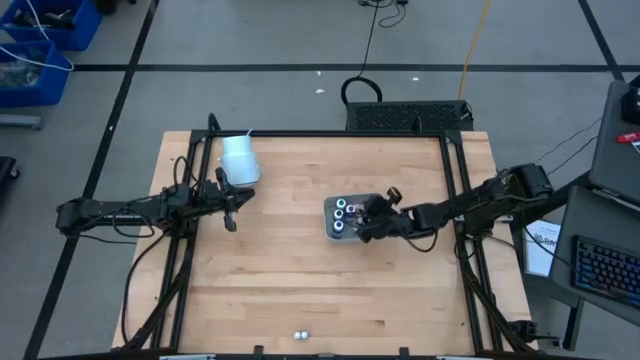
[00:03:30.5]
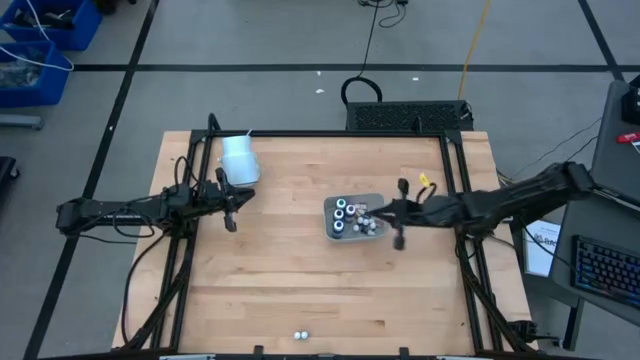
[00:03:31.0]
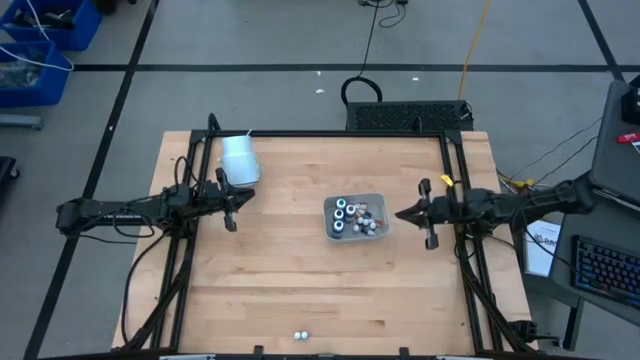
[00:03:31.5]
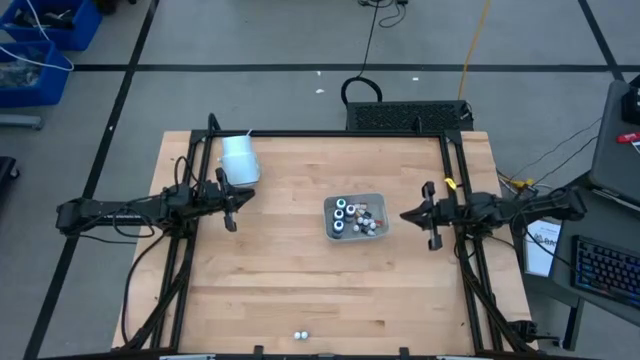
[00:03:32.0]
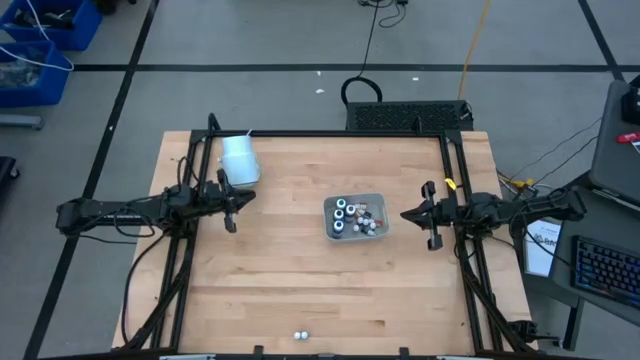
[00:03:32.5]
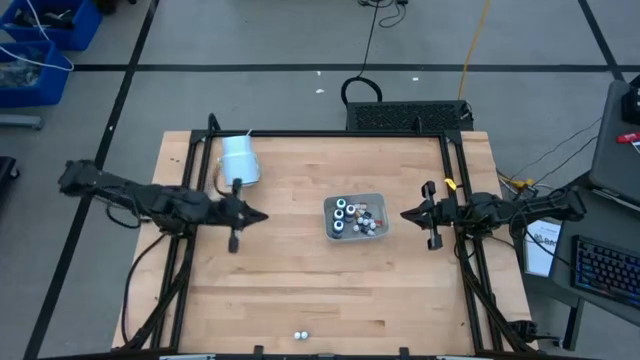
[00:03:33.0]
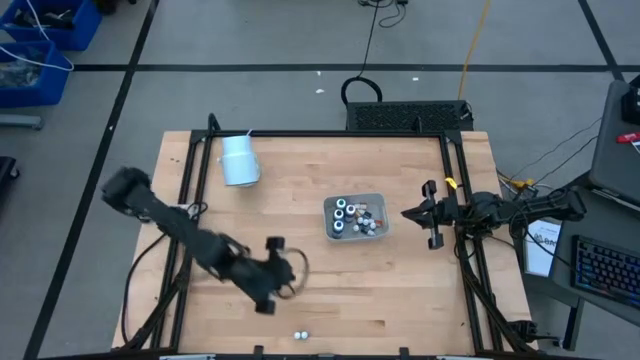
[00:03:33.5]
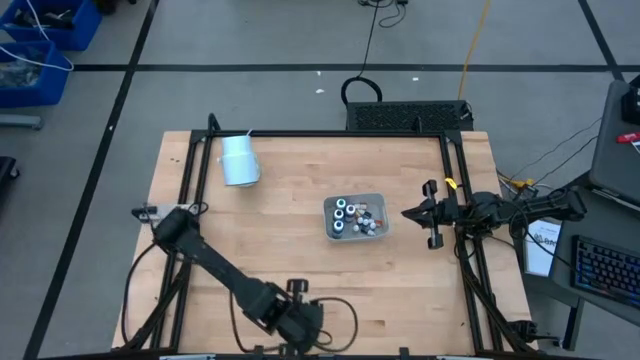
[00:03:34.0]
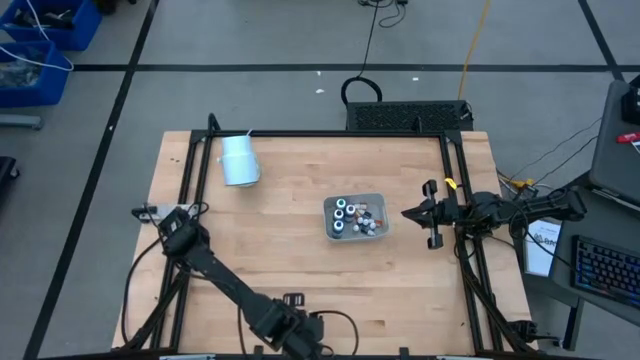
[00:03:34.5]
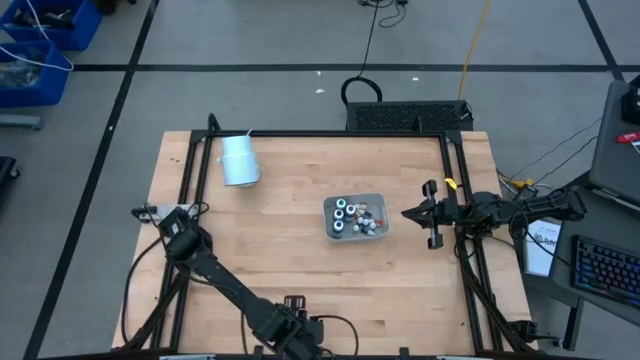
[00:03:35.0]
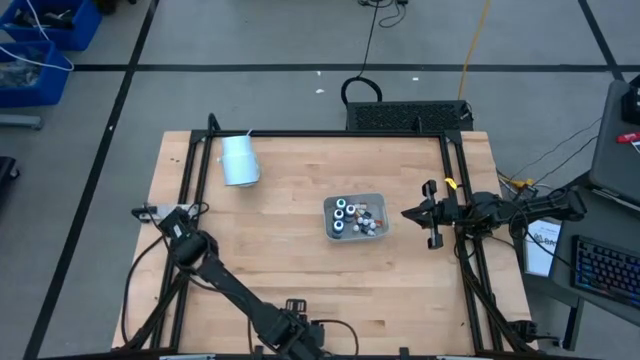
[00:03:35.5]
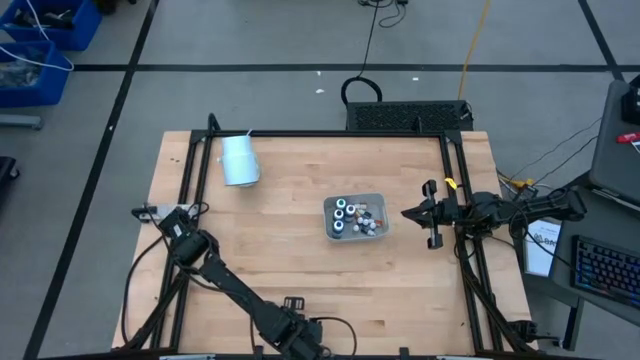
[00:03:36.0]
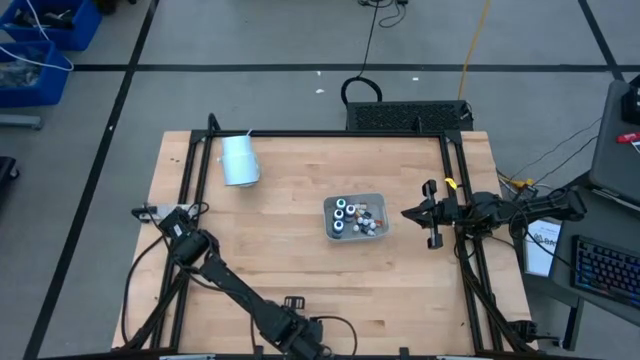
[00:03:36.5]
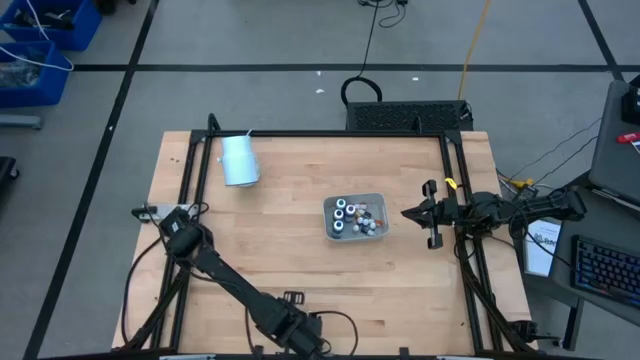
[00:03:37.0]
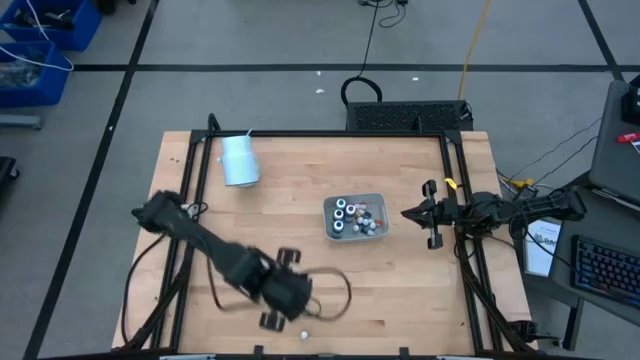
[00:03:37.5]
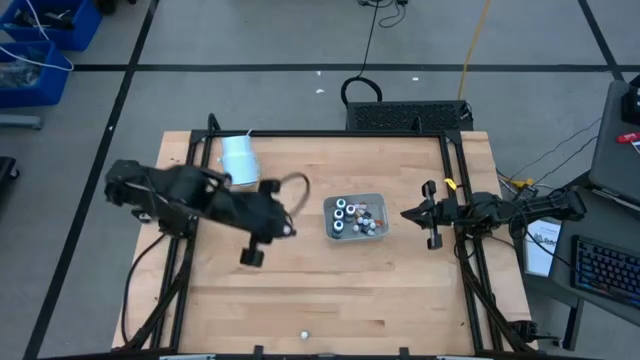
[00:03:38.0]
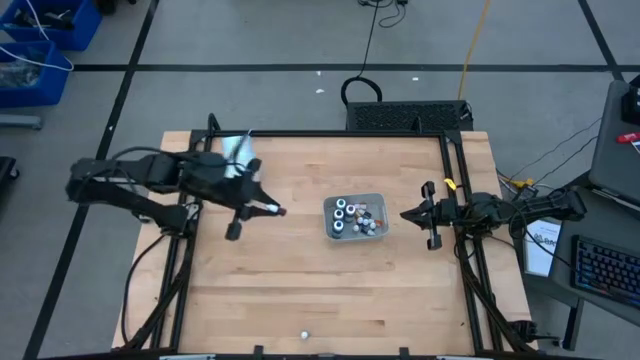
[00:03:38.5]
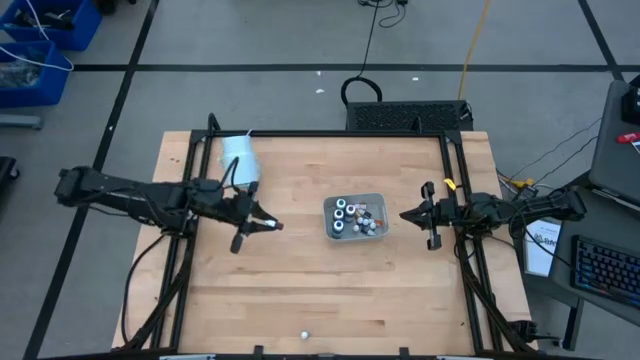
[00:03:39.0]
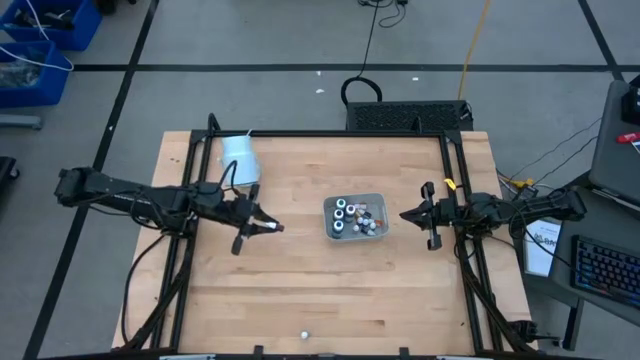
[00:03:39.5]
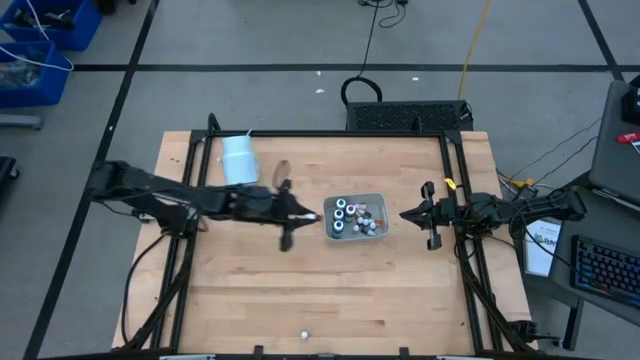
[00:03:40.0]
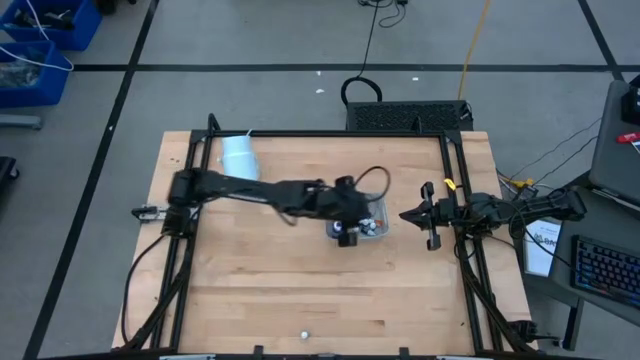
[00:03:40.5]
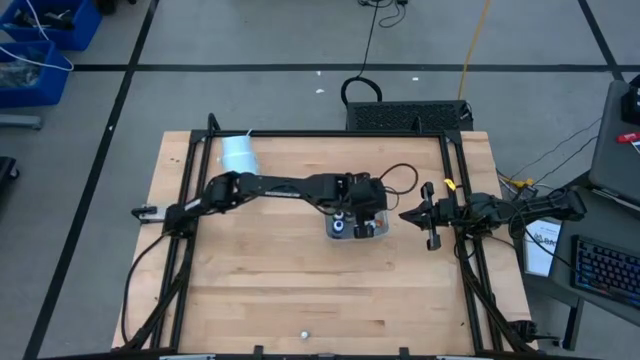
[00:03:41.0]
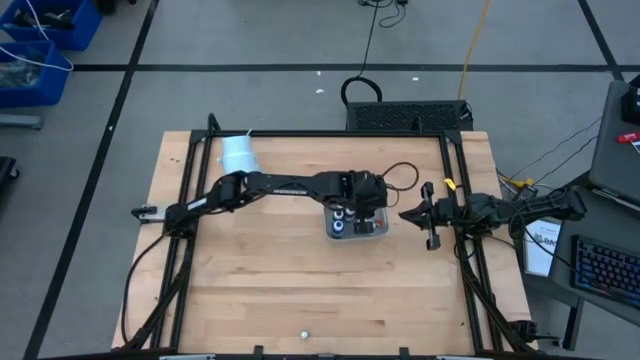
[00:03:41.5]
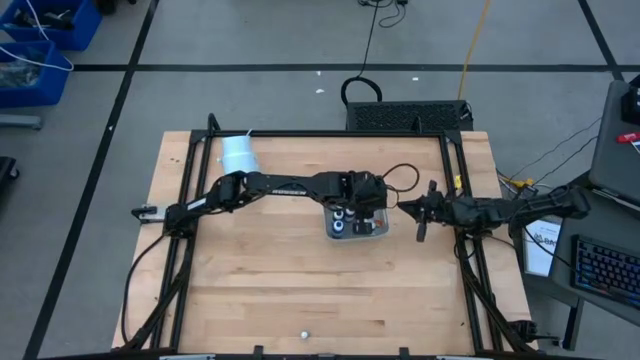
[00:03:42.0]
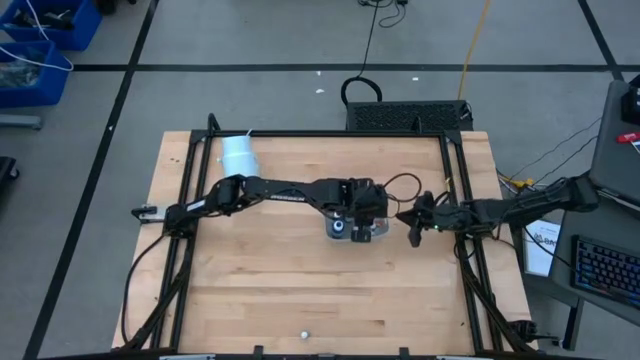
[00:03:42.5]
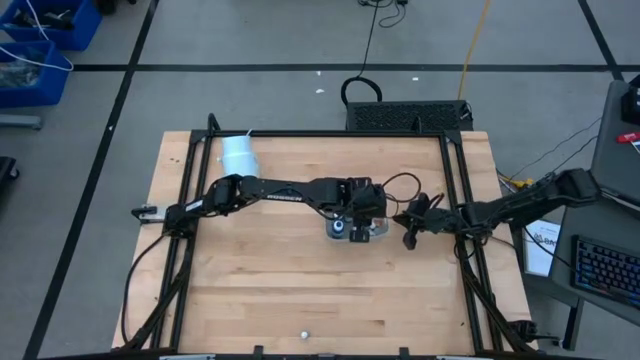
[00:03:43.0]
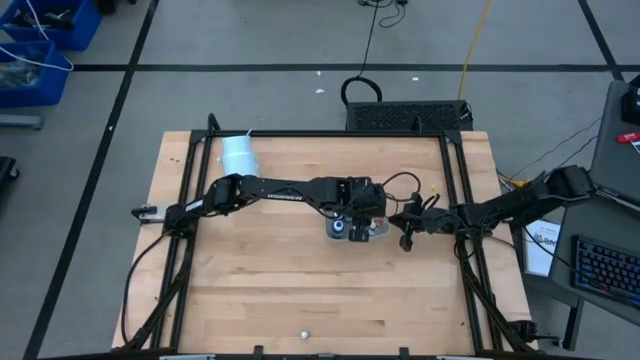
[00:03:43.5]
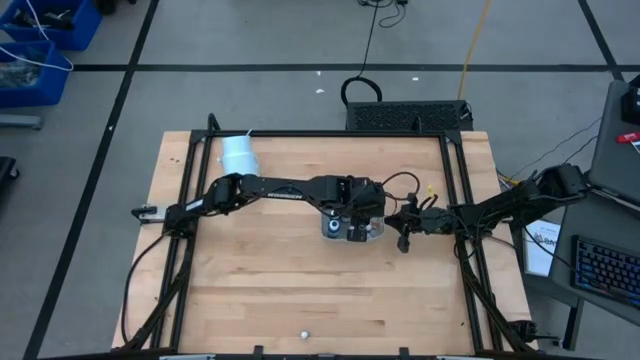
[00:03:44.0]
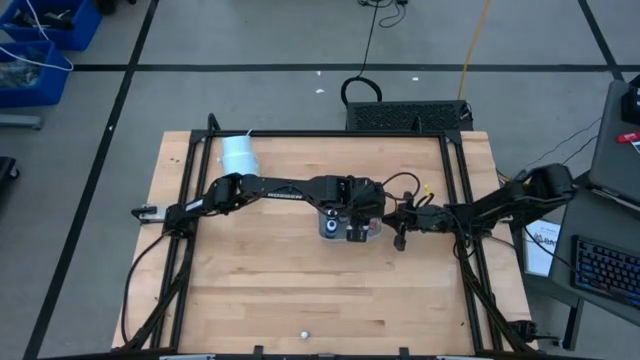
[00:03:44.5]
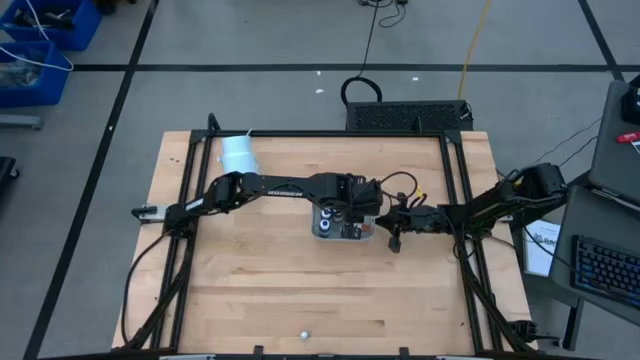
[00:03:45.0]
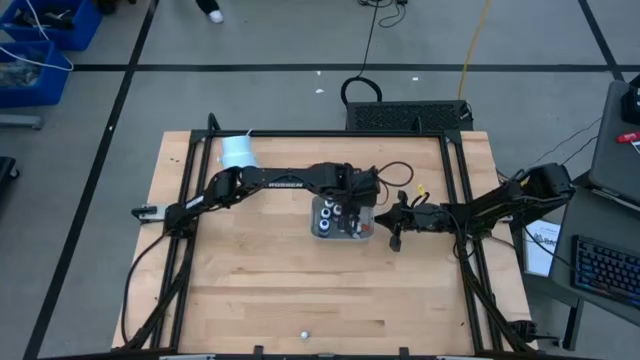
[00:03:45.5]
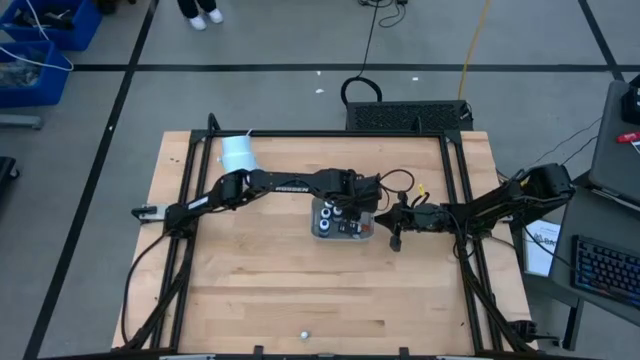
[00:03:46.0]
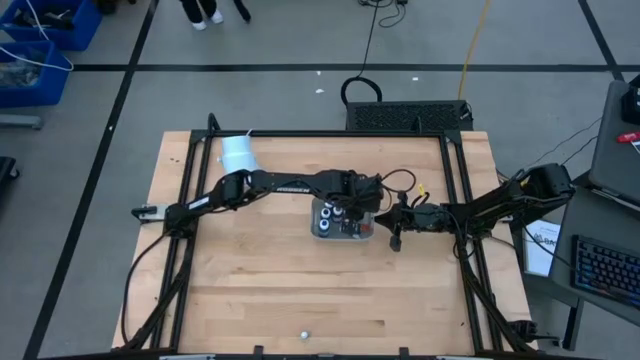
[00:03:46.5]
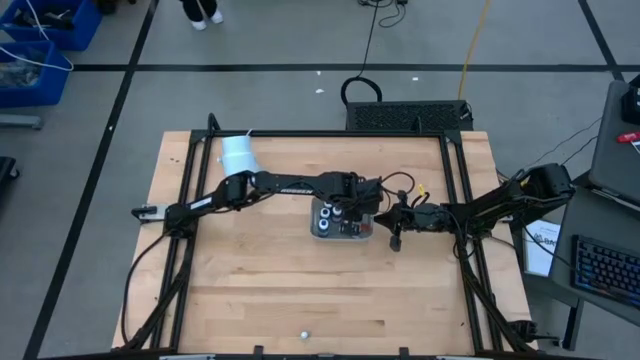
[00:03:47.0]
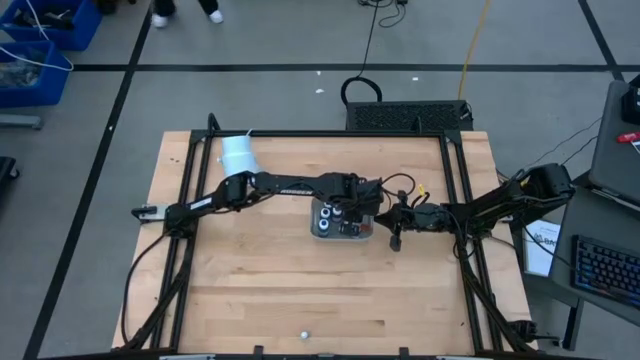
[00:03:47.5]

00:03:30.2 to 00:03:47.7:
Task: Pick & Place food coloring
Put the small dark orange food coloring bottle into the bin

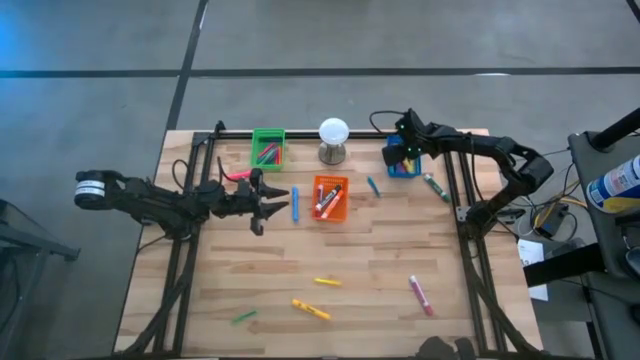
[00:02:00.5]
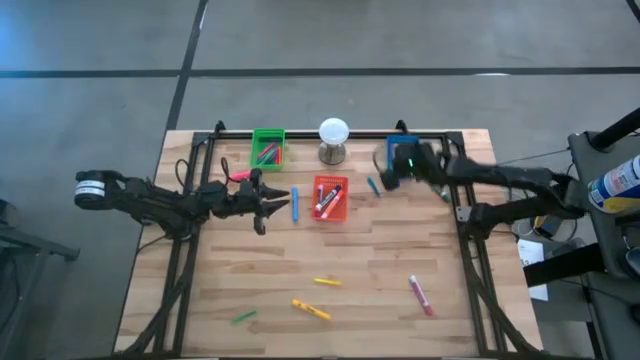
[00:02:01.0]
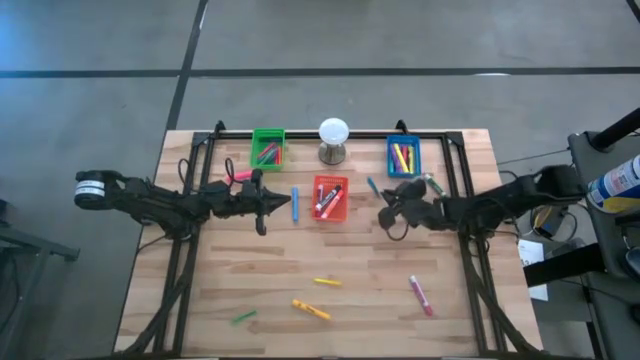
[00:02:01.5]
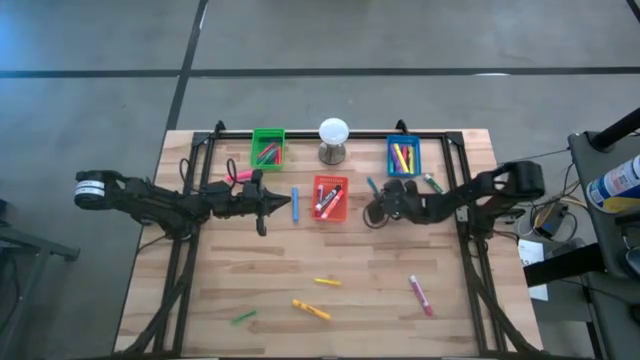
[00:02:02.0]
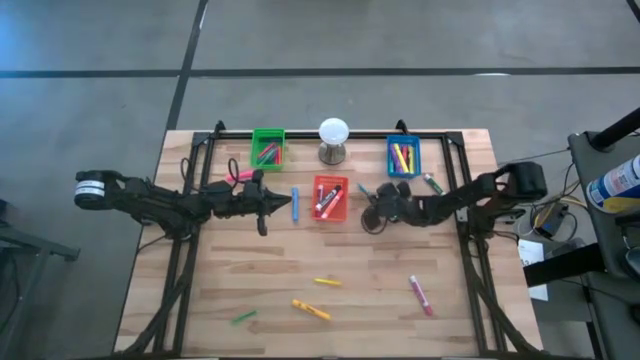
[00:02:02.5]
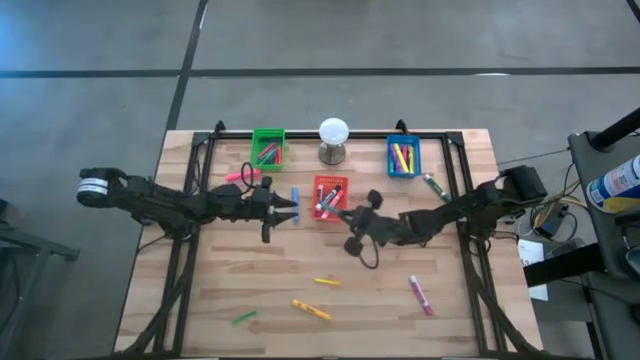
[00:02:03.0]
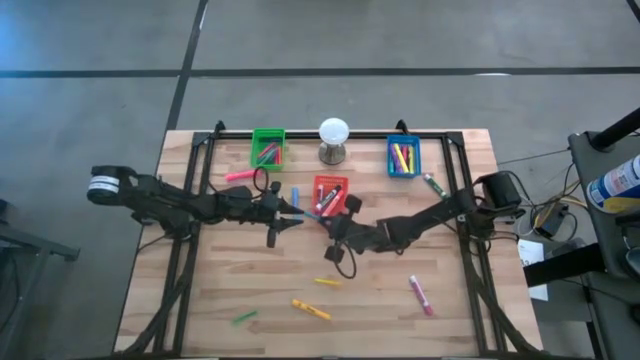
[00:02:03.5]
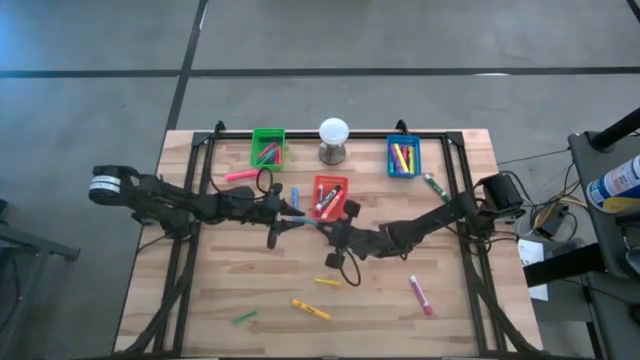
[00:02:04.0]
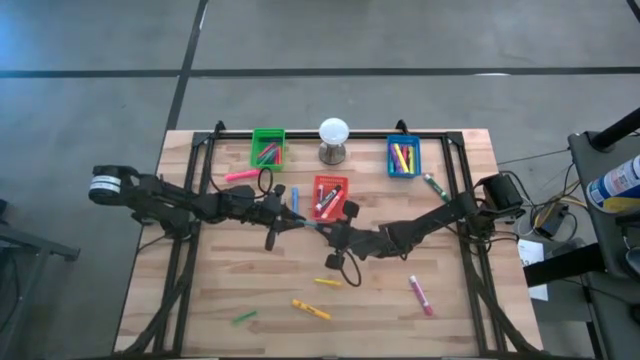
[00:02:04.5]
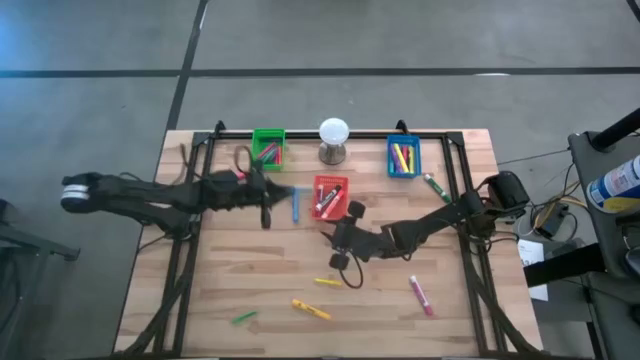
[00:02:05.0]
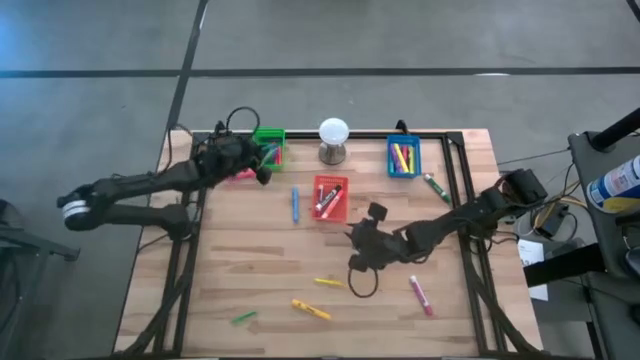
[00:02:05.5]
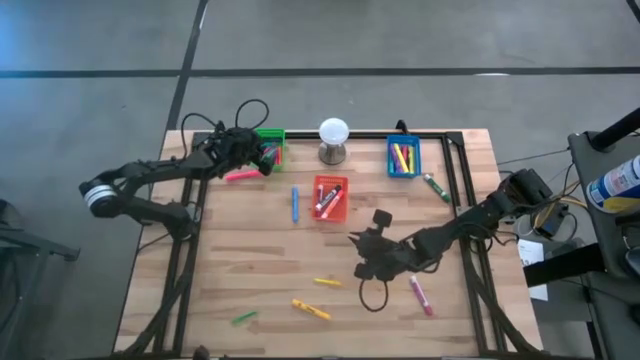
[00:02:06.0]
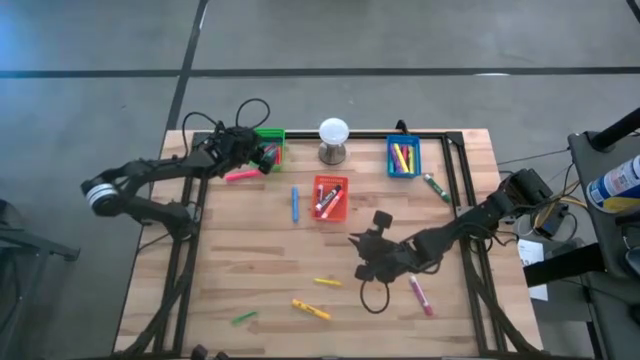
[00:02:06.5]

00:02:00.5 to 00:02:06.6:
Task: Pick & Place Markers
Put the blue pen into the green bin
